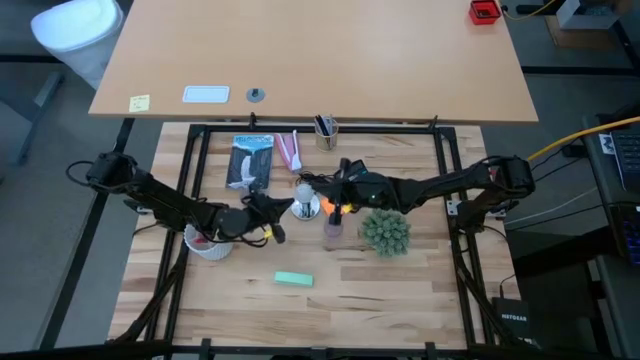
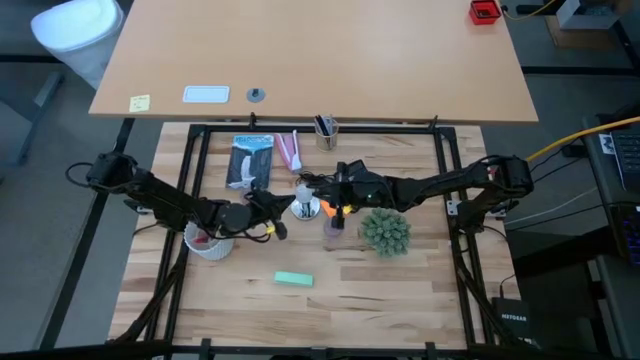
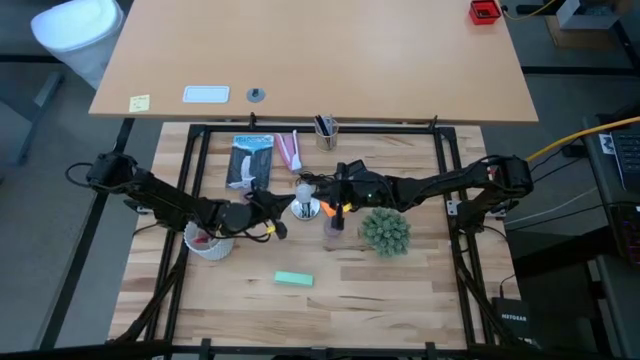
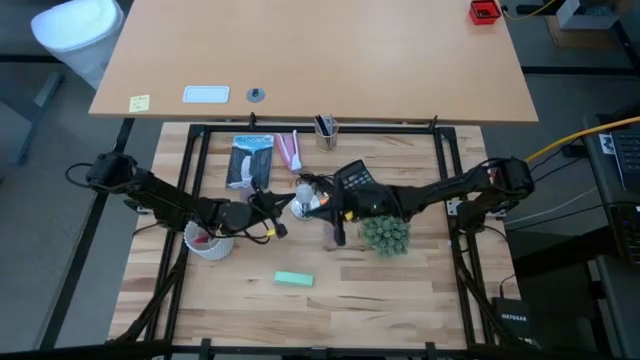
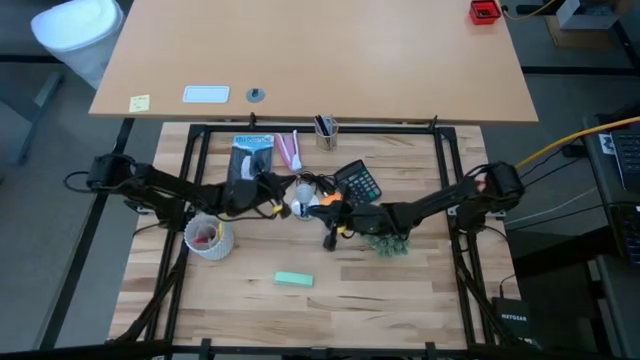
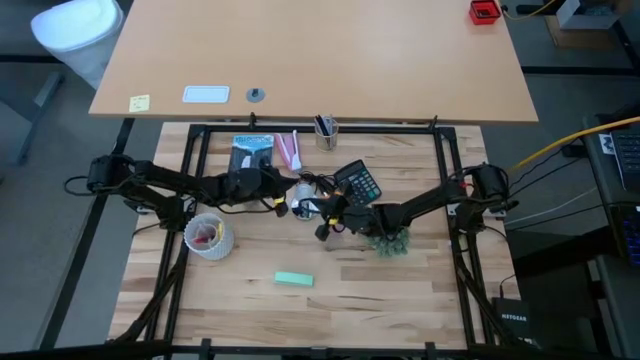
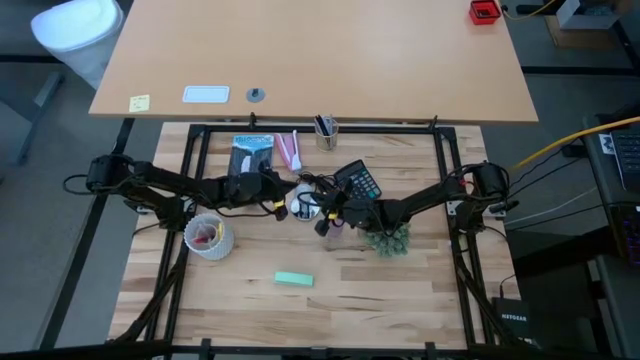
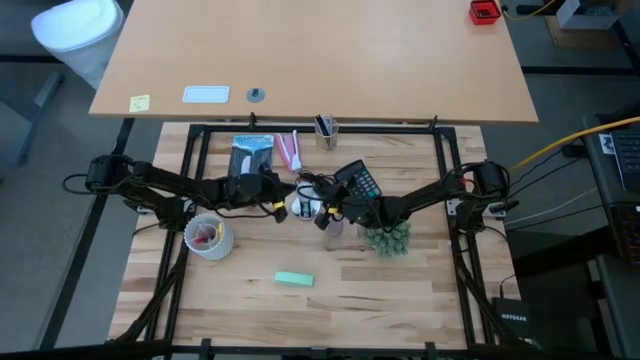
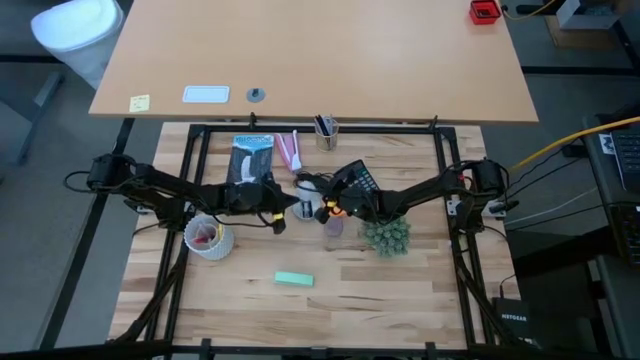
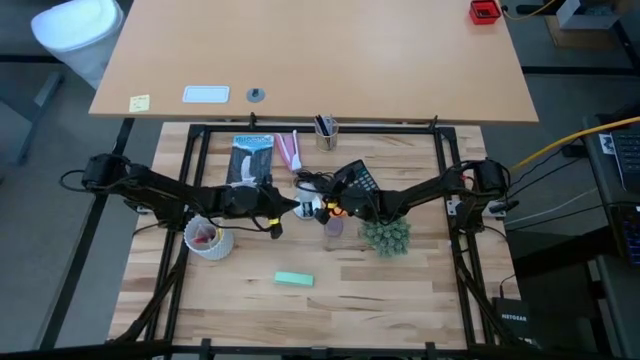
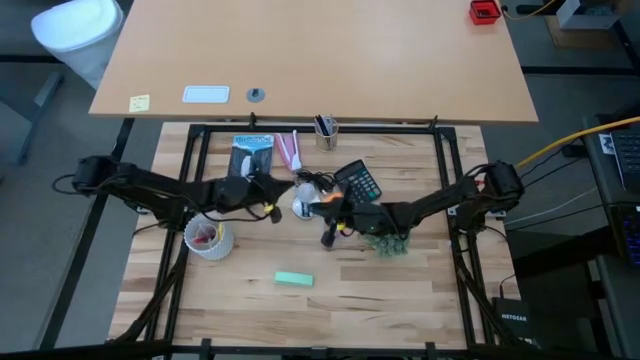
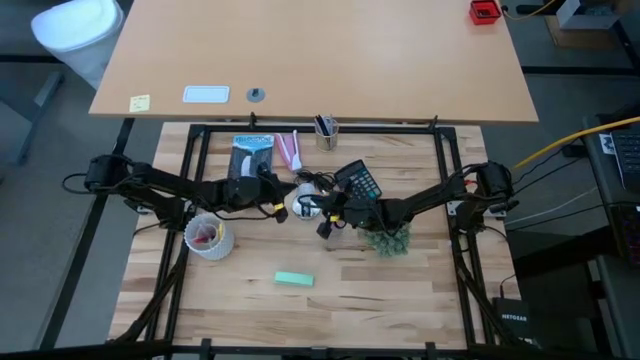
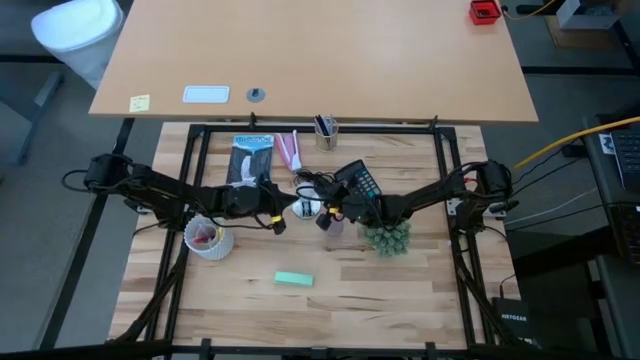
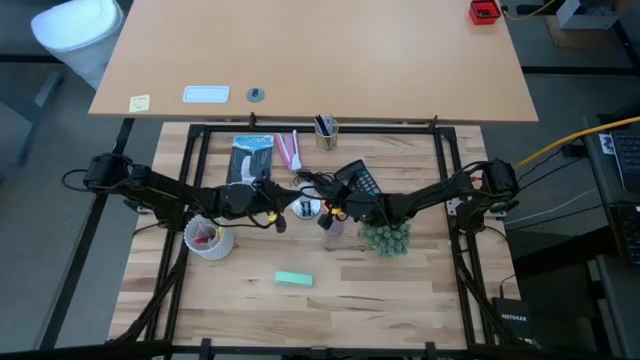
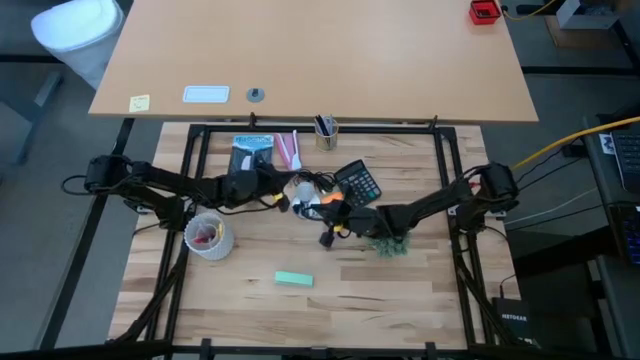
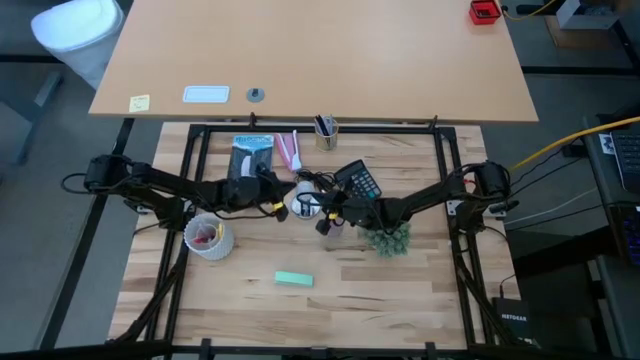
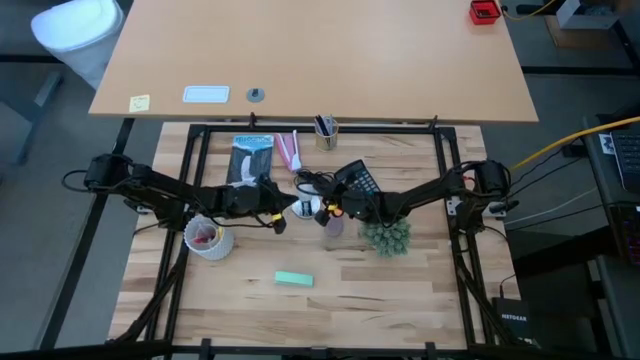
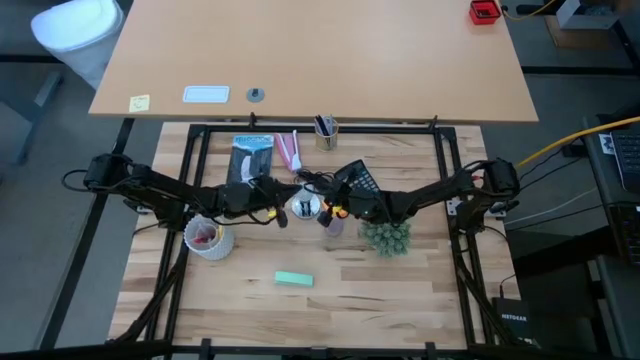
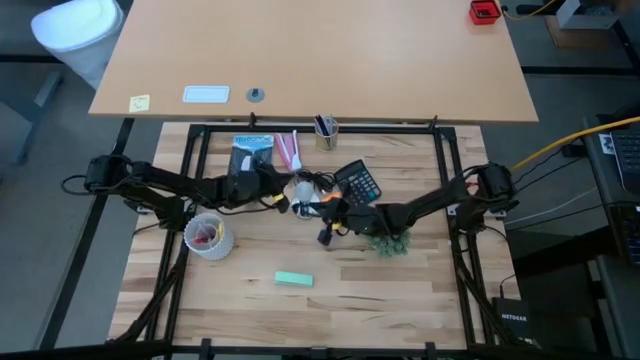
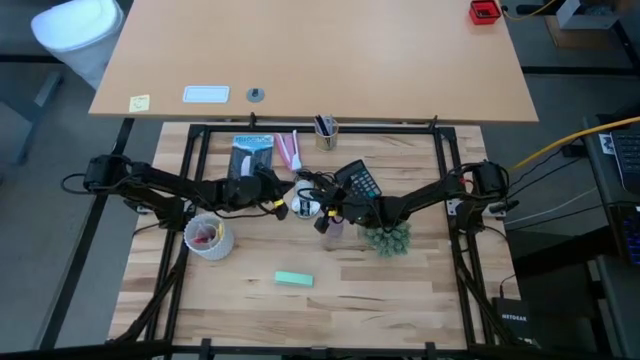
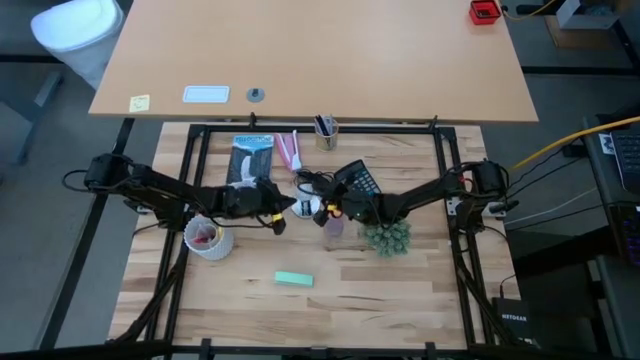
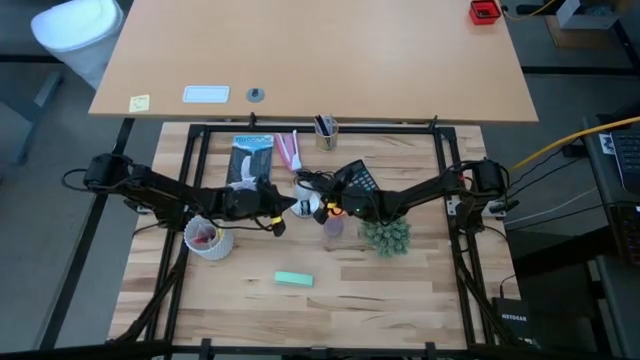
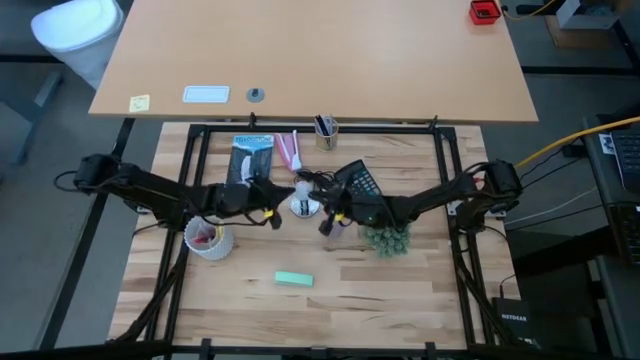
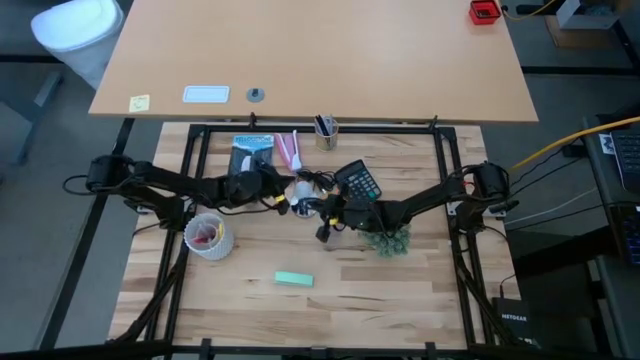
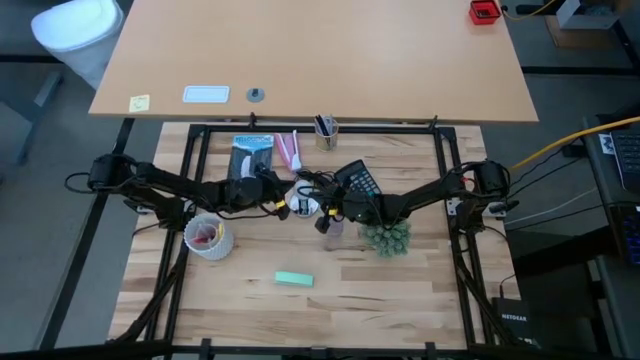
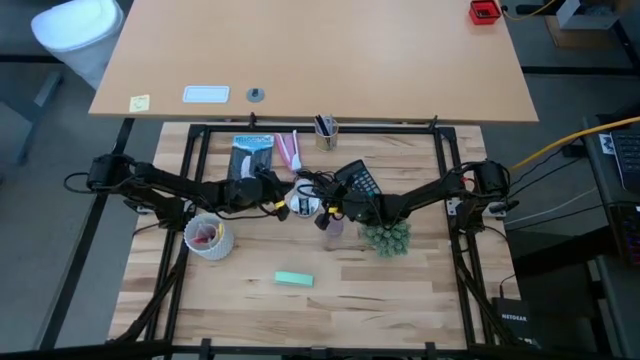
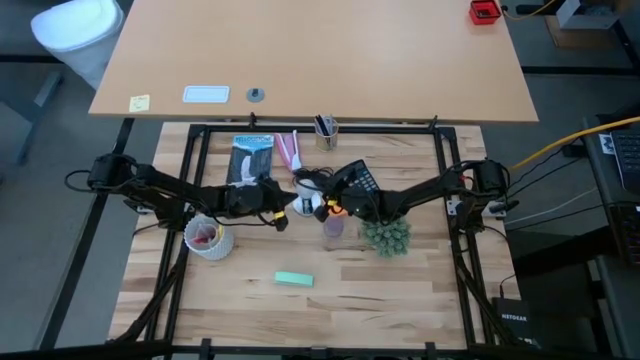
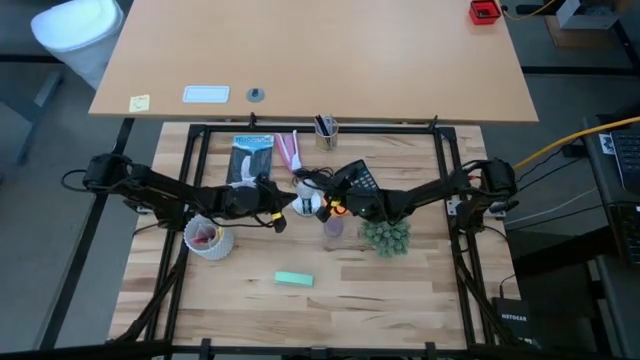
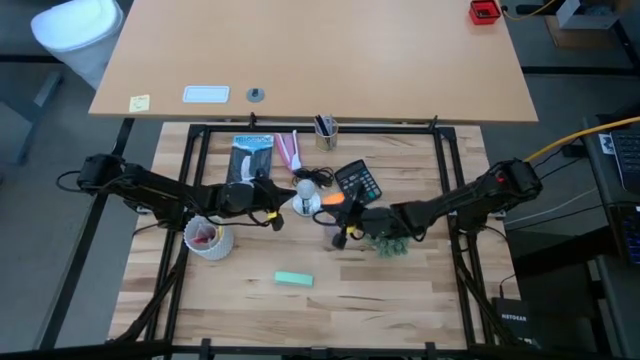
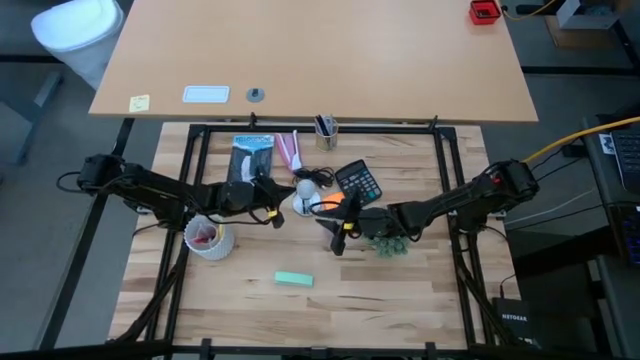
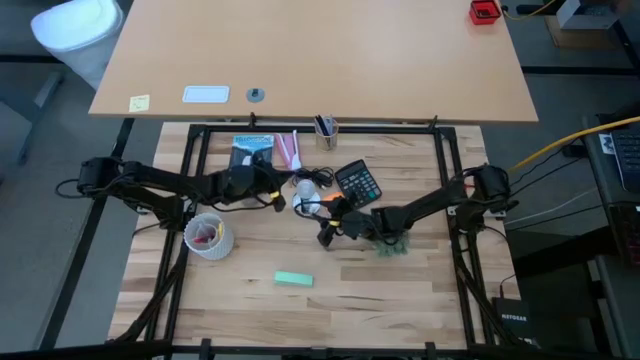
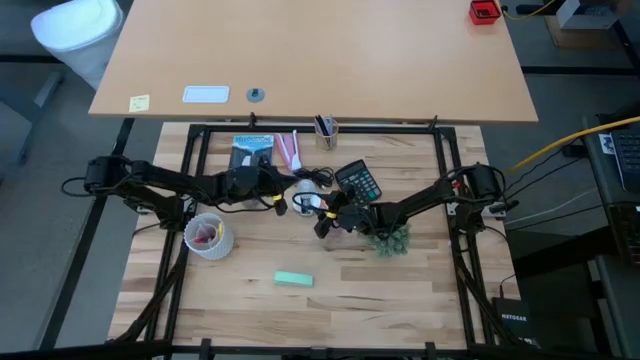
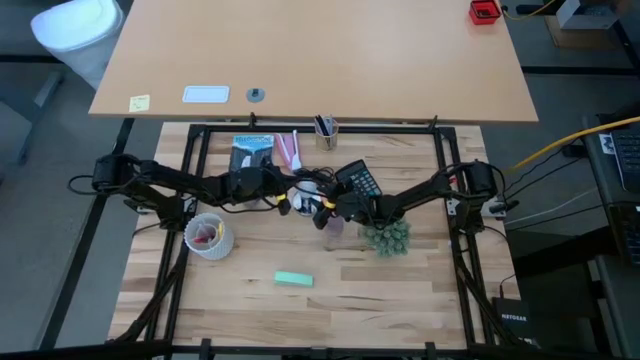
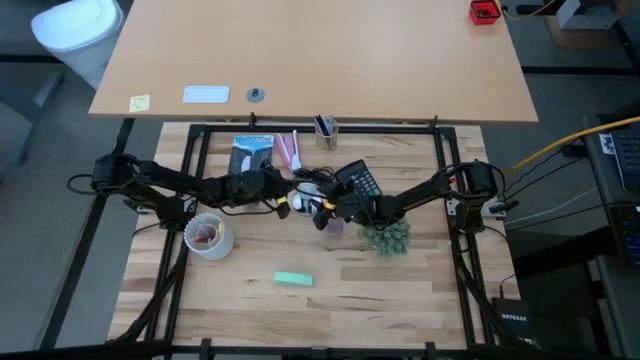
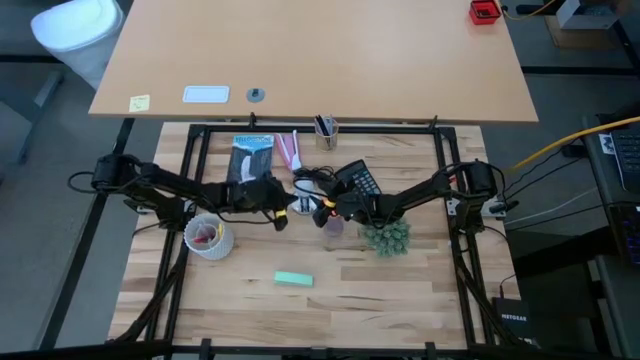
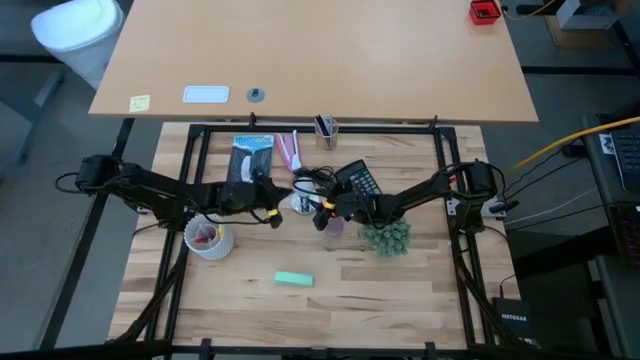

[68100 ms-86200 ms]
Task: Screw lightbulb
Remove the lightbulb from the lamp

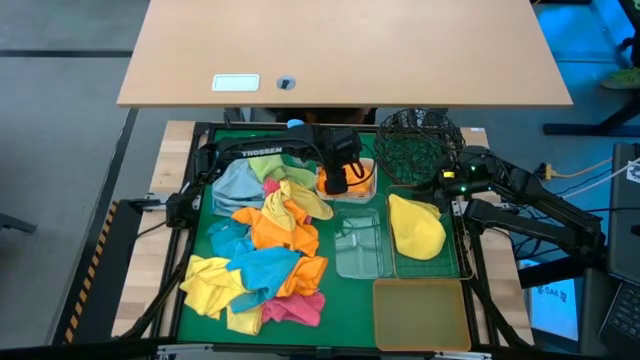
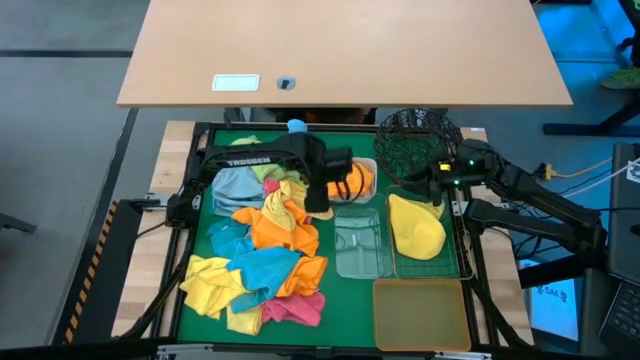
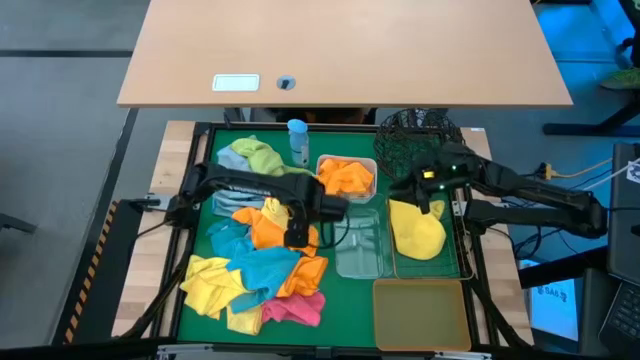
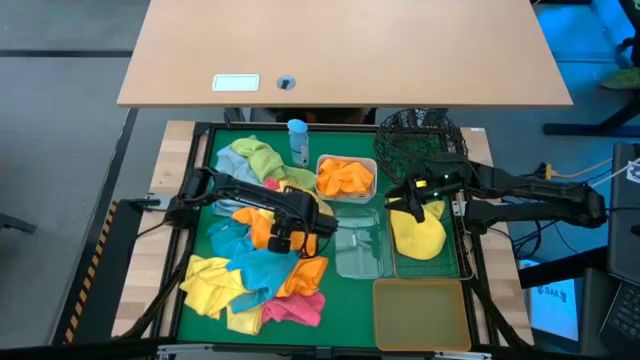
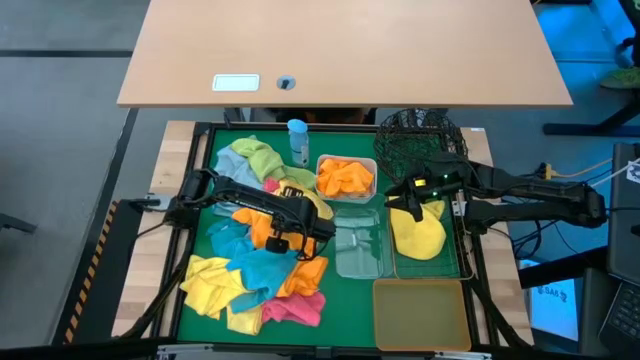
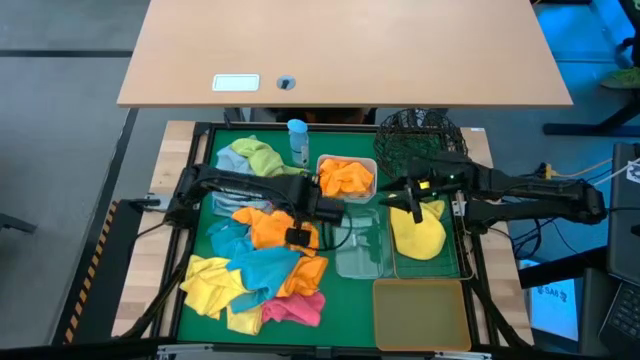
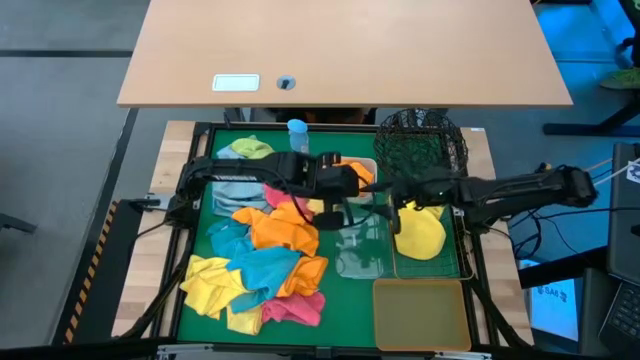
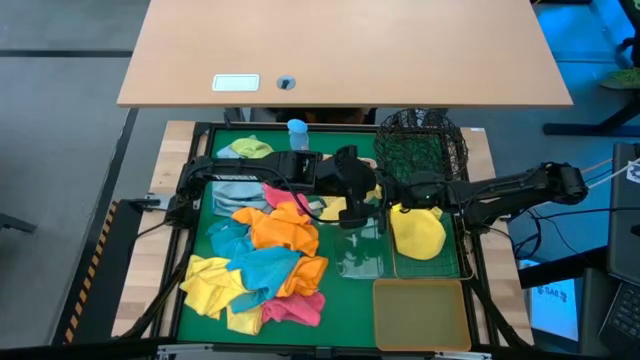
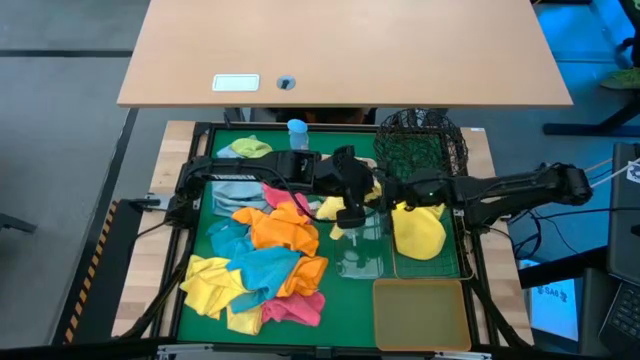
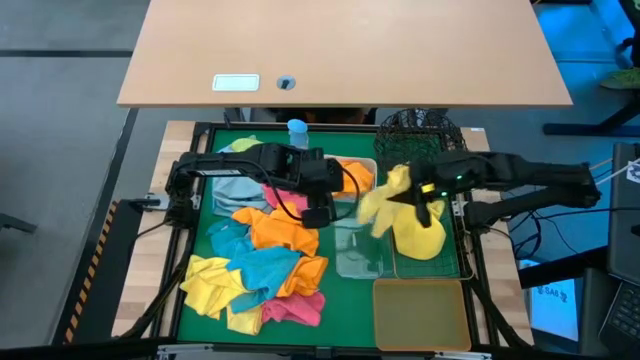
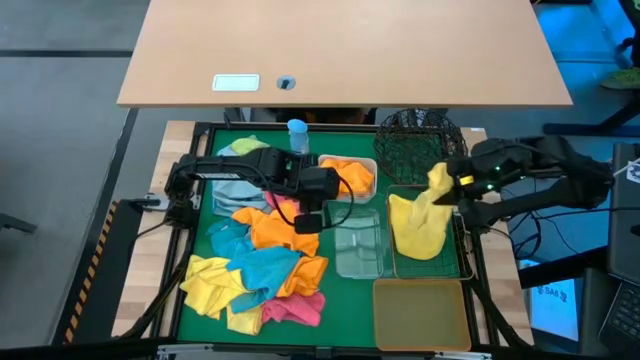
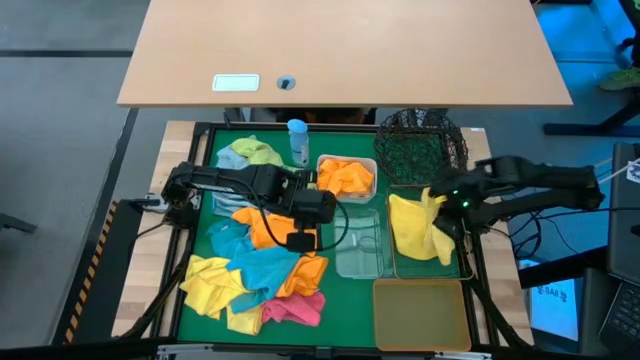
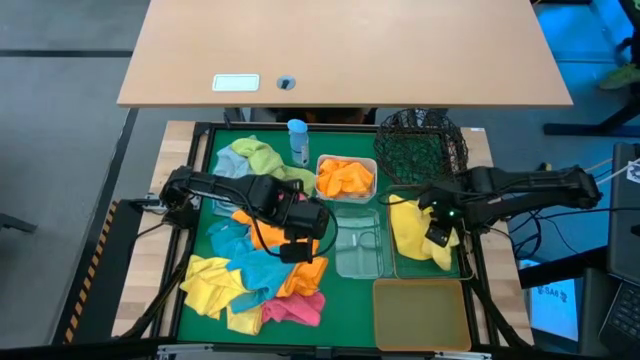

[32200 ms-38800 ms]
Task: Sort microfiber towel by color & place in baskets
Put the yellow towel into the gold wire basket
